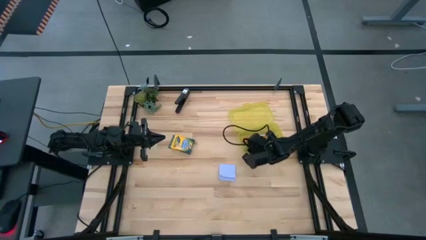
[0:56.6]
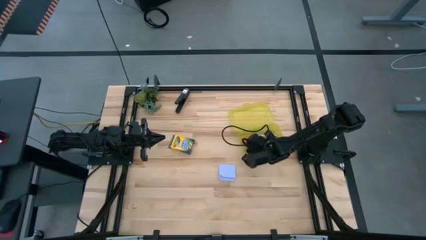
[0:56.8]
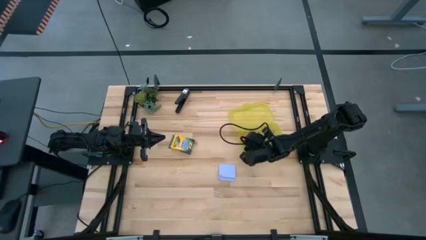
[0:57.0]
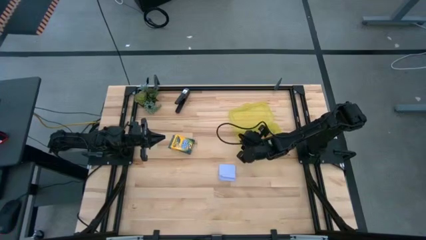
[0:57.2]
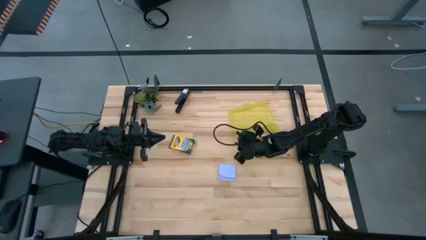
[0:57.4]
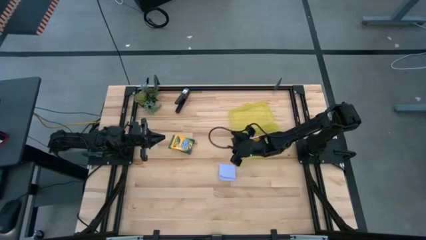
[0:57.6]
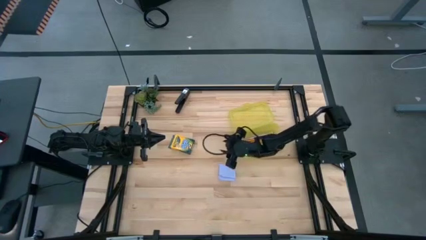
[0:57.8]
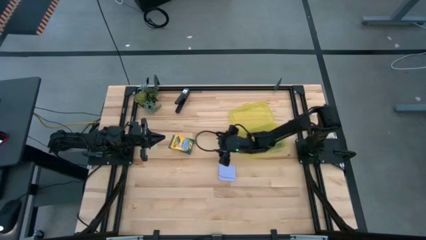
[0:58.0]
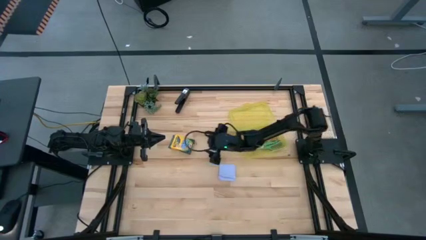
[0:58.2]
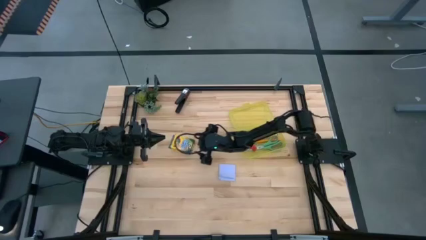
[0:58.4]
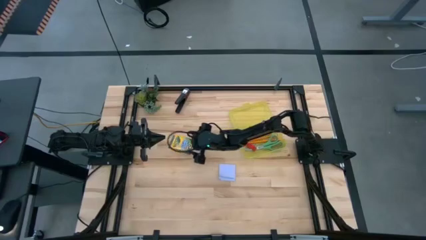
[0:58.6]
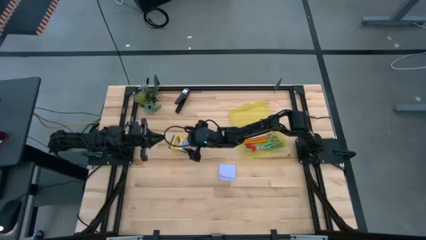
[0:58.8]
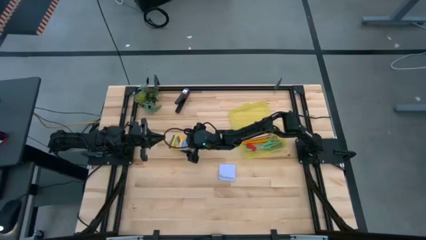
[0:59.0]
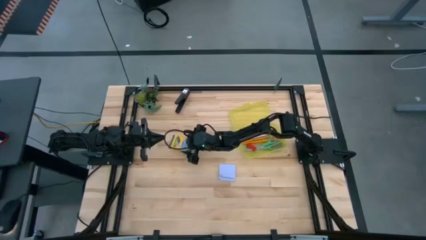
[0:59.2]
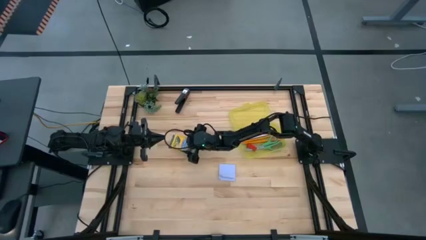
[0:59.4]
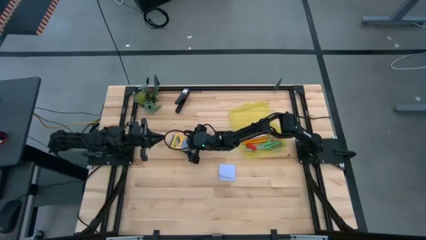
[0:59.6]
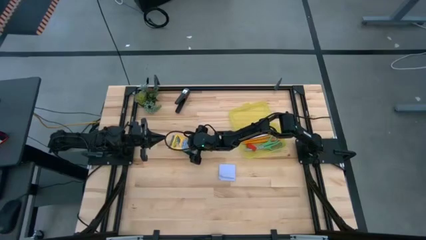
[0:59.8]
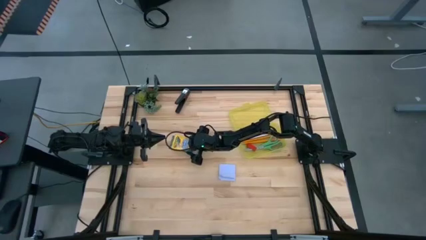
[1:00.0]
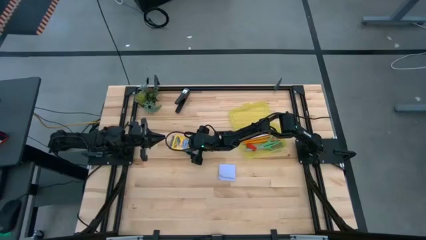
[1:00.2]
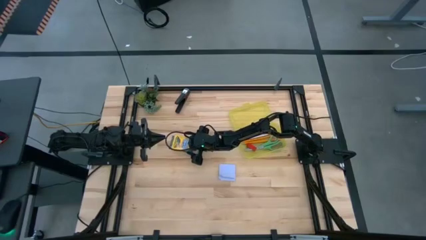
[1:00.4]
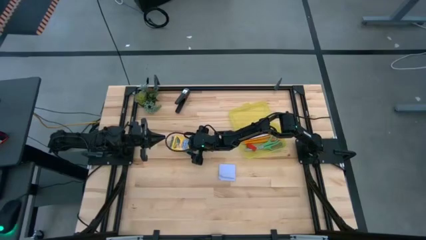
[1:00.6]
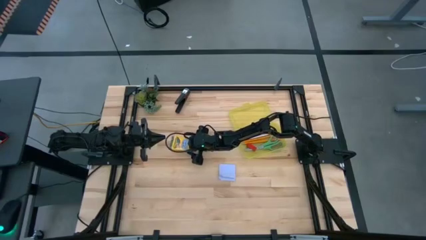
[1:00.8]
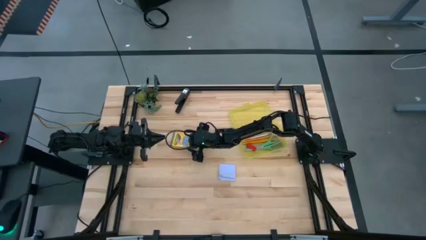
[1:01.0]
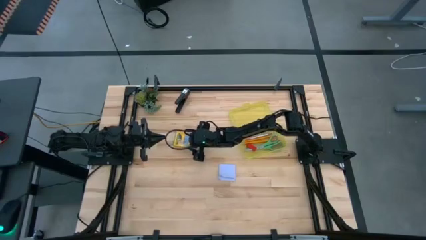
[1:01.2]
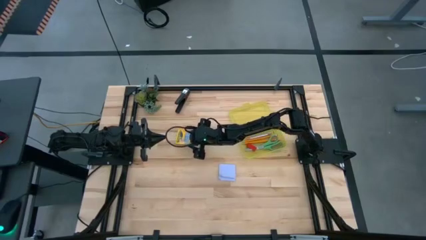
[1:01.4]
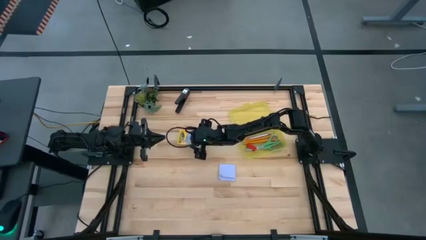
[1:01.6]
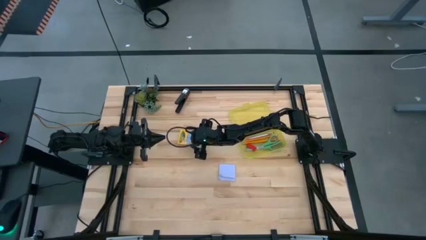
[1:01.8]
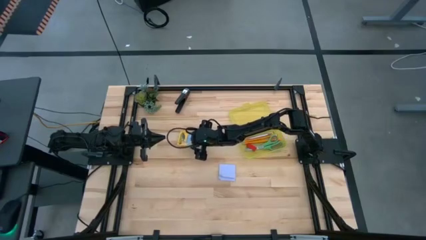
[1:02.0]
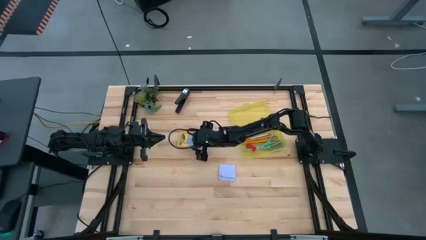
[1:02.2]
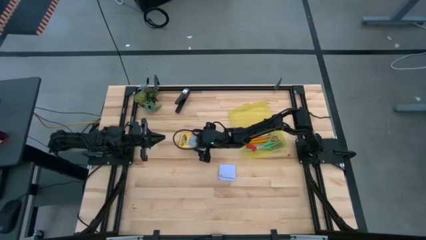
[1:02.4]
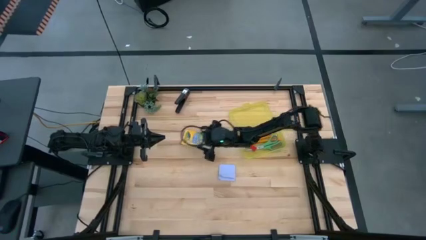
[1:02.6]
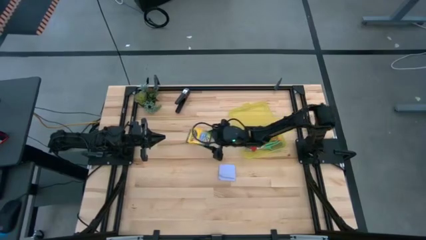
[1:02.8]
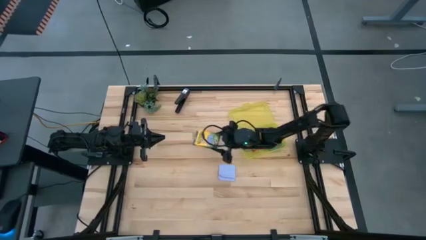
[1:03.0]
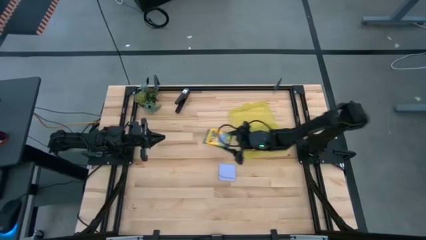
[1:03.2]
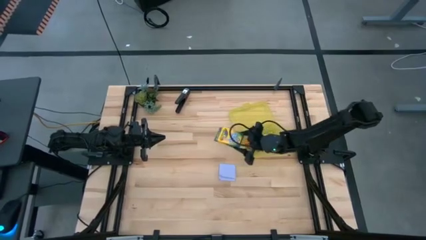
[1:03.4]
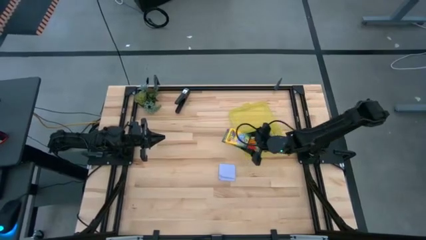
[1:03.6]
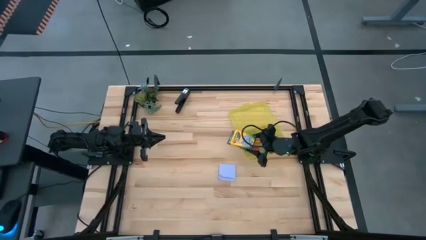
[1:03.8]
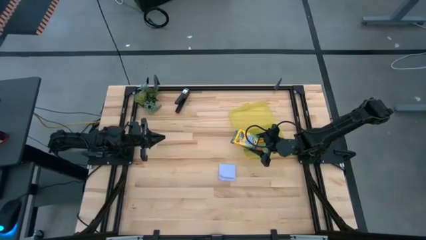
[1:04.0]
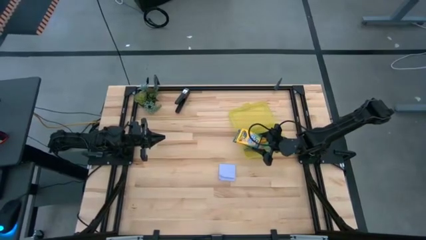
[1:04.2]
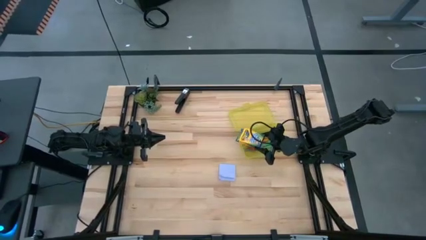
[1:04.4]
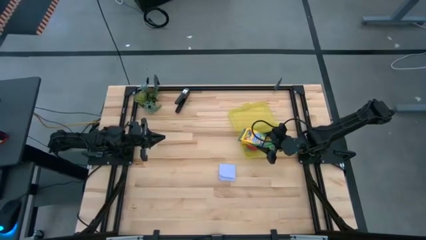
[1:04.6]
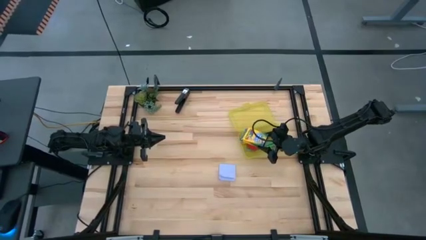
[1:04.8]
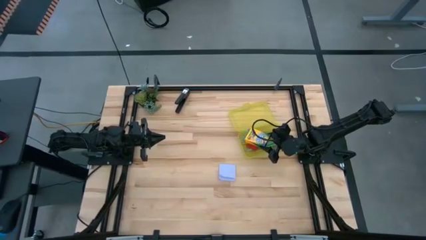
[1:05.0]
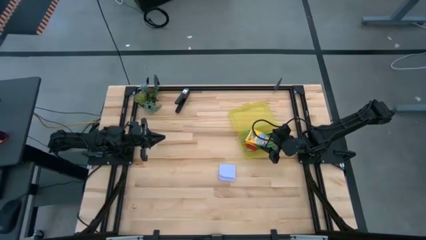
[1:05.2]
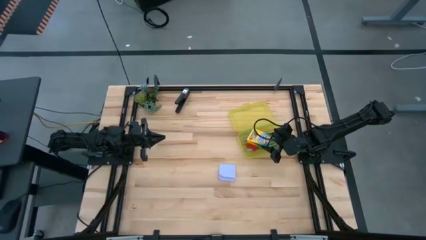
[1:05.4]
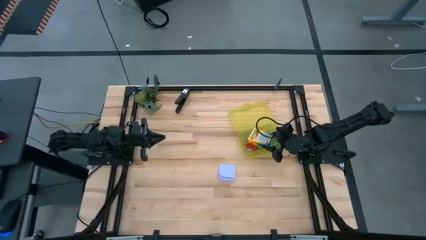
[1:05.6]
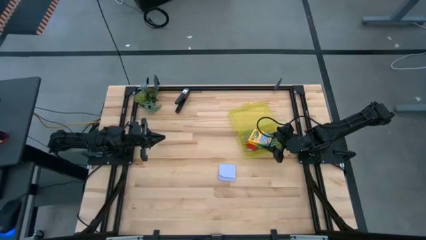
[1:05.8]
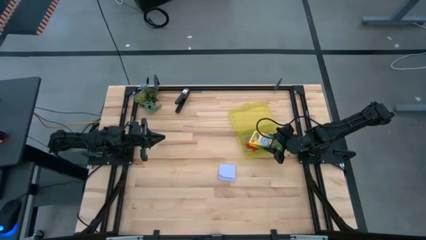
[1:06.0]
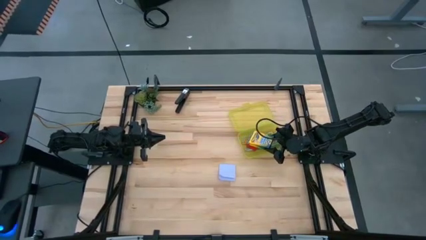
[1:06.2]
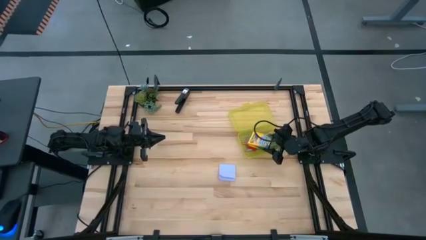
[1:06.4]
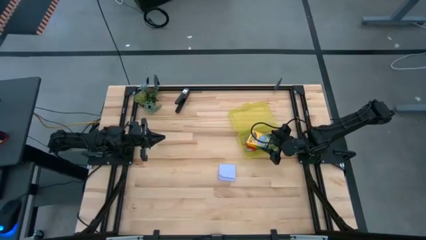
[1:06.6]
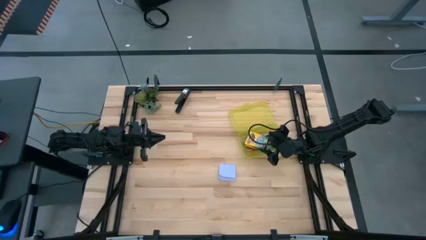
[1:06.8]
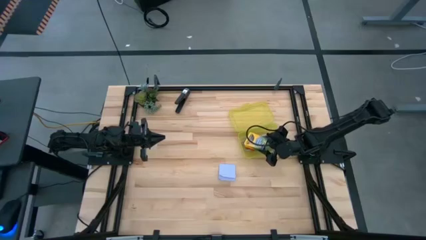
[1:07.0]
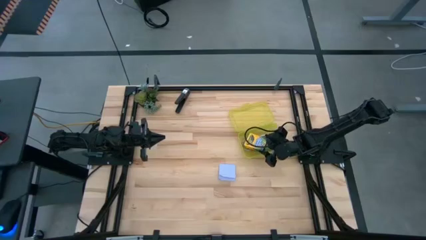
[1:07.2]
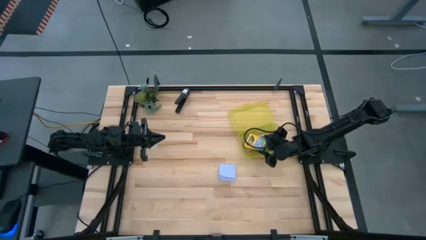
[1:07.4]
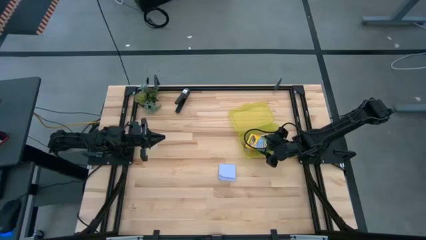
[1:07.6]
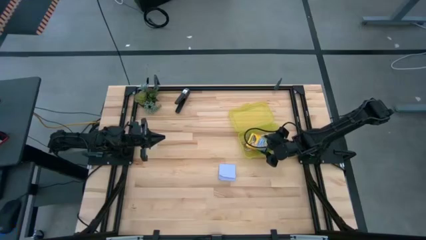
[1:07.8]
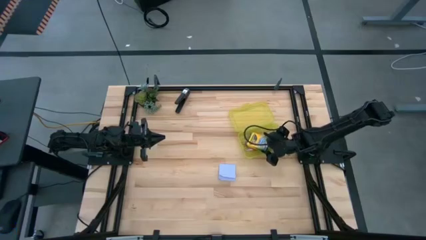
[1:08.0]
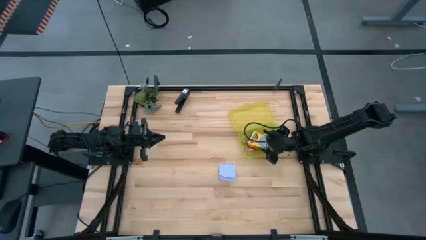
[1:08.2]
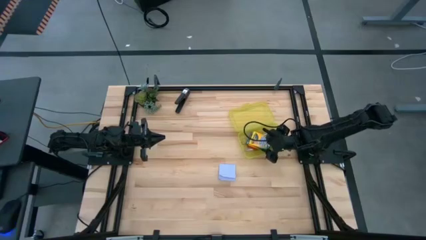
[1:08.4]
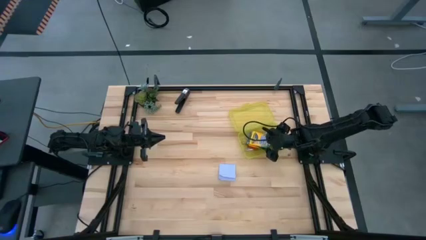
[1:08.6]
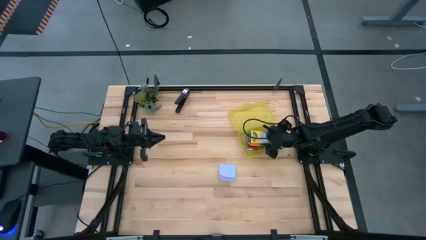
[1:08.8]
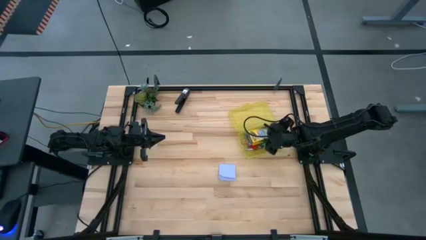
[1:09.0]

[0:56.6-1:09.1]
Task: Pack school essentials
Put the yellow crayon box into the yellow supply box

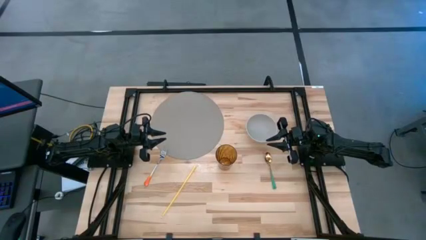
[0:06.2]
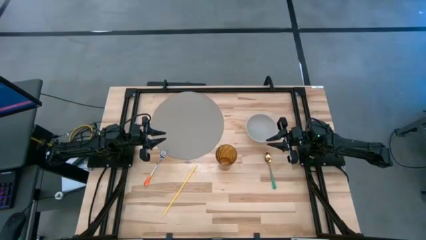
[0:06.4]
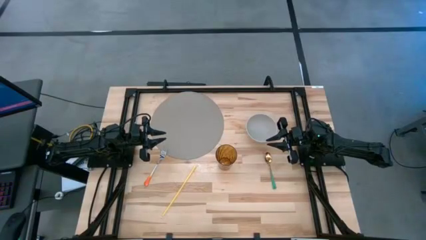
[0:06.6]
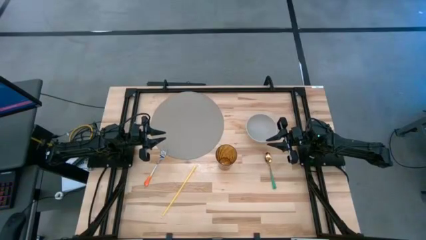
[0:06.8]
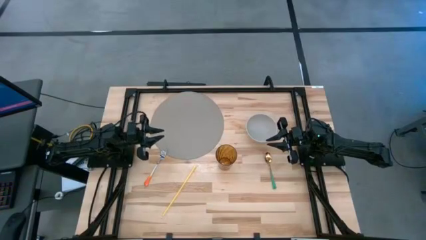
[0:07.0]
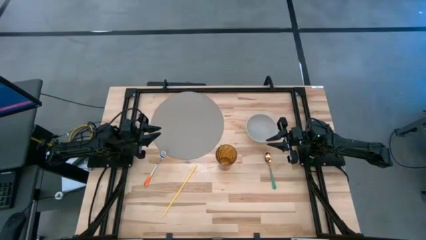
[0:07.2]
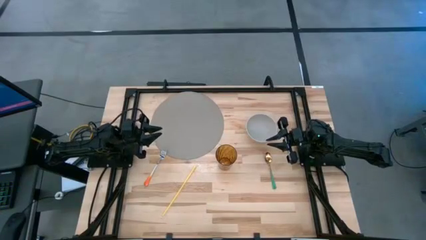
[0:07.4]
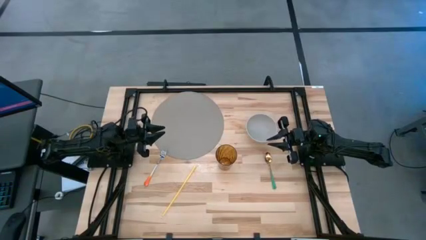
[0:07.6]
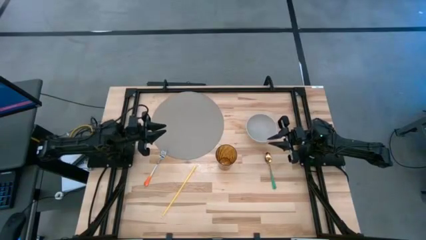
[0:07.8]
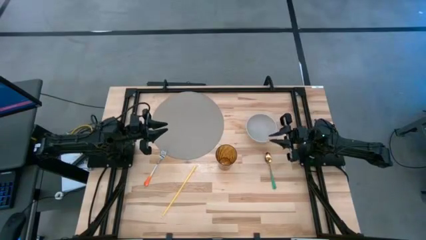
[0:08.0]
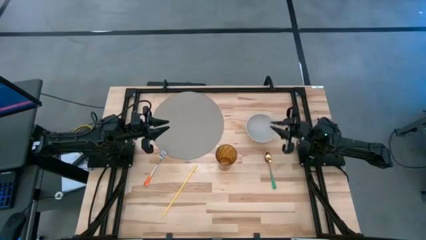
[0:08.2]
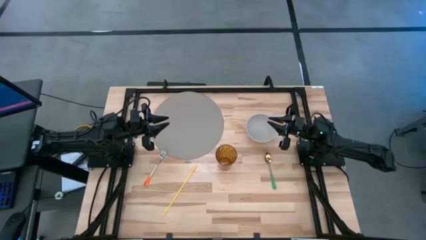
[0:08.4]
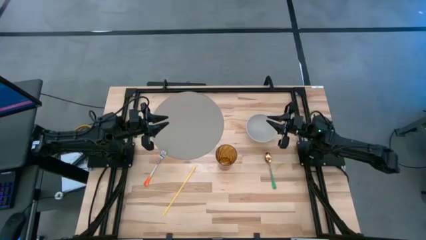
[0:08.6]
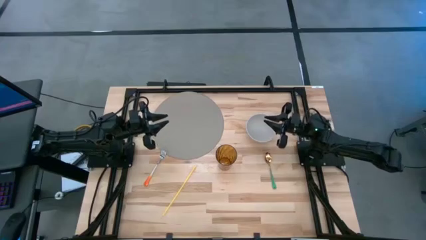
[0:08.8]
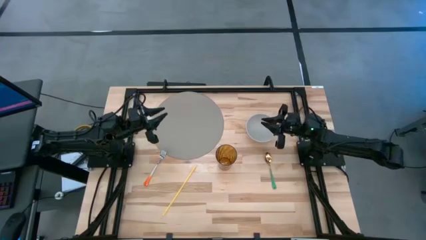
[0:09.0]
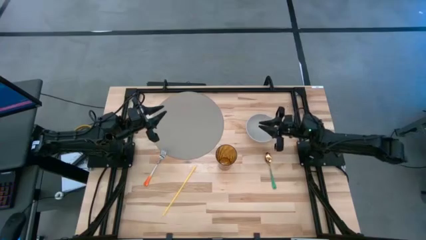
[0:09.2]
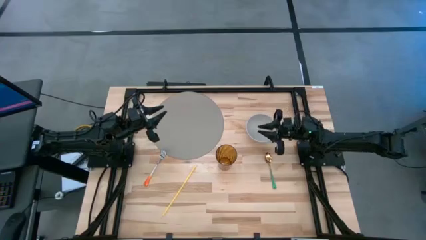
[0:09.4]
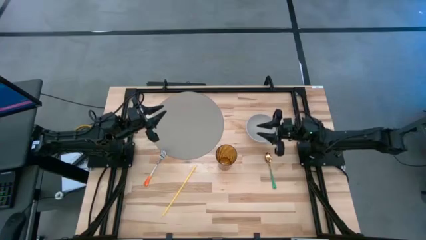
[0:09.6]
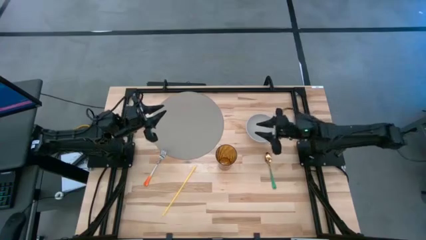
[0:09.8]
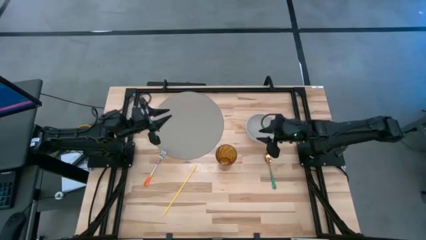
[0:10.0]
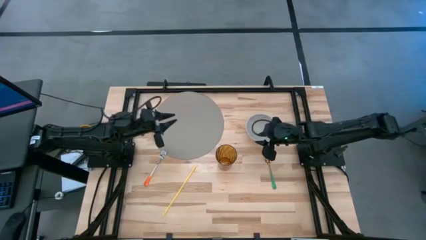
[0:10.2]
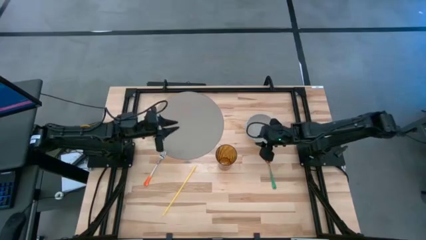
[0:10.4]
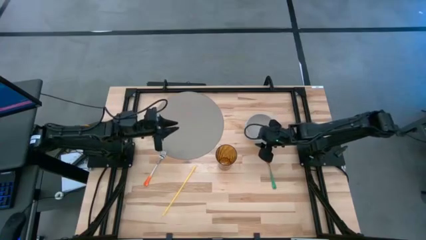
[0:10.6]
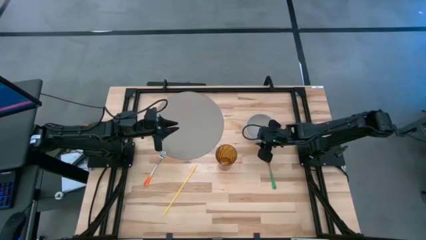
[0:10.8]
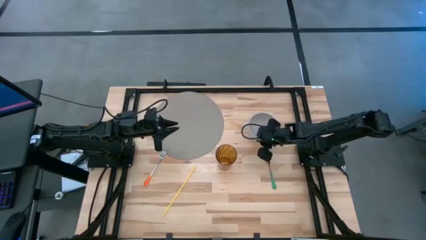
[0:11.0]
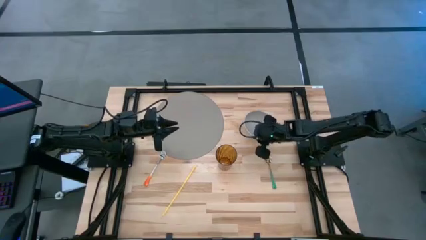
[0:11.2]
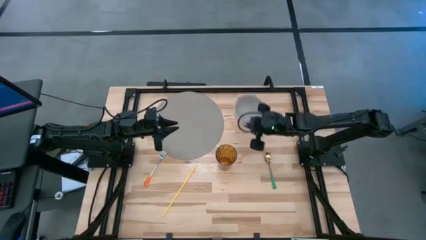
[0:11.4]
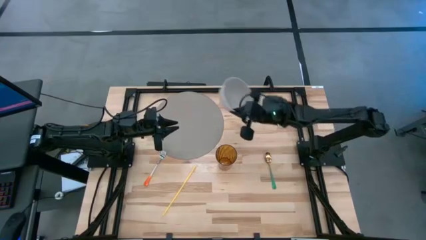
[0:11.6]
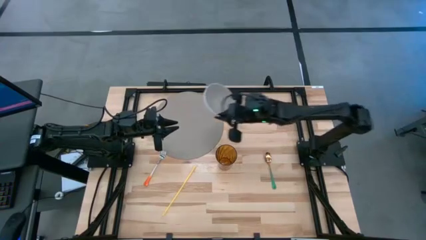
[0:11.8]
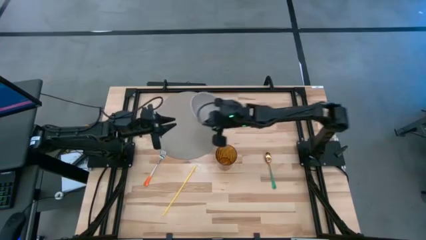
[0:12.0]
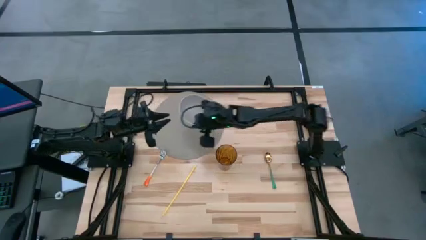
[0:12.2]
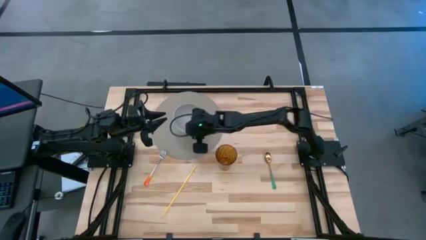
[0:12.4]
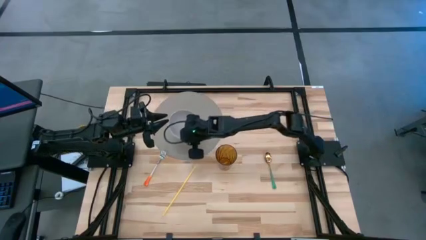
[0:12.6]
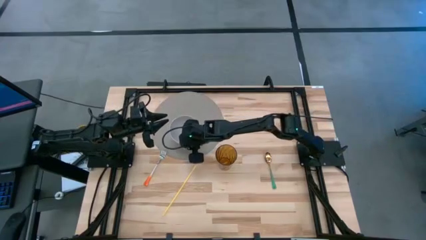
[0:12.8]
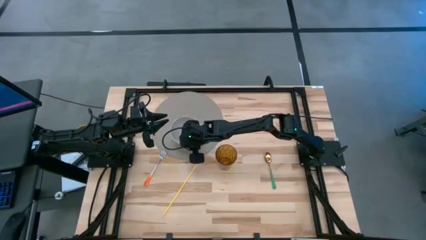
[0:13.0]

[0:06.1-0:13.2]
Task: Pick & Place Utensil
Put the bowl on the table placemat
